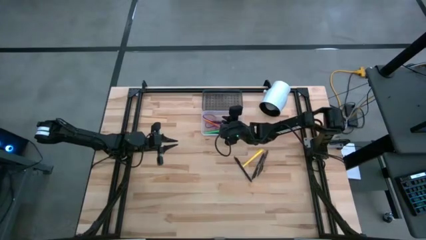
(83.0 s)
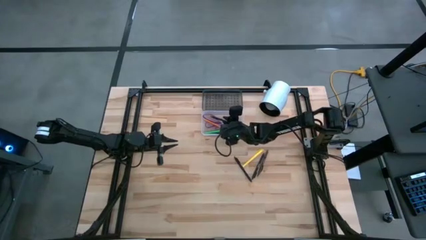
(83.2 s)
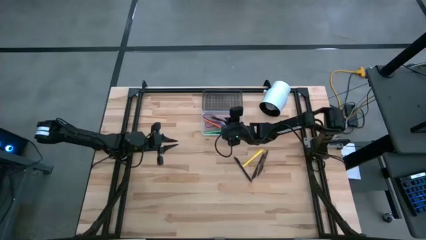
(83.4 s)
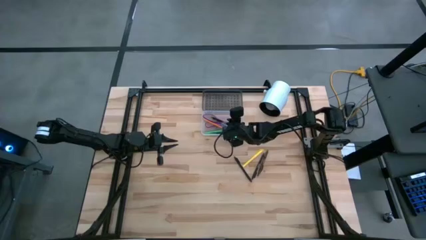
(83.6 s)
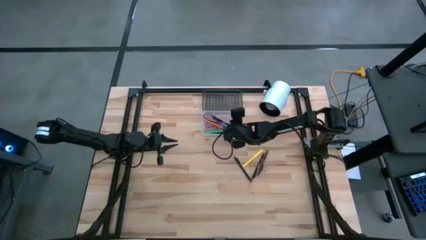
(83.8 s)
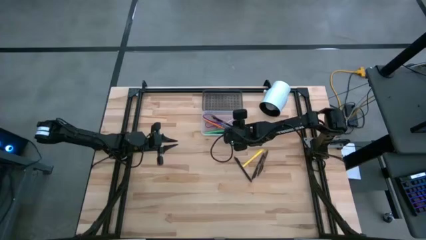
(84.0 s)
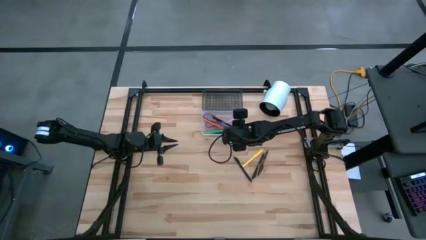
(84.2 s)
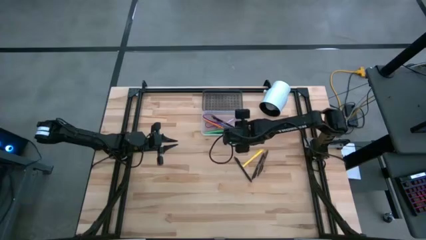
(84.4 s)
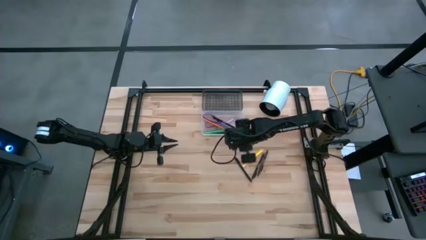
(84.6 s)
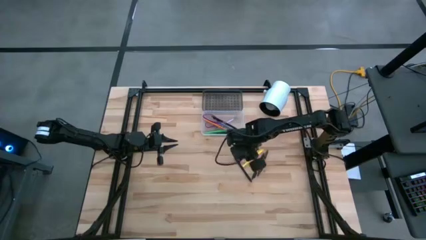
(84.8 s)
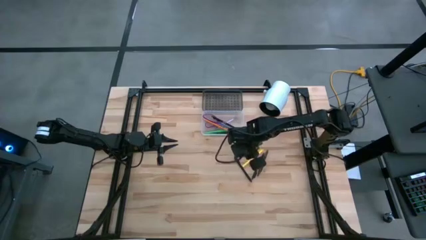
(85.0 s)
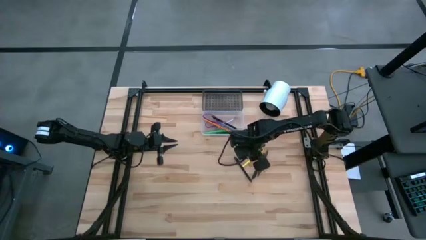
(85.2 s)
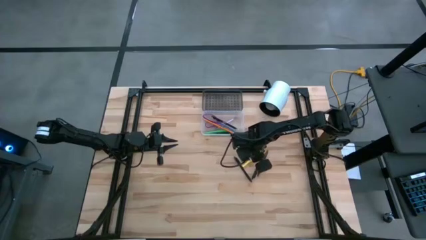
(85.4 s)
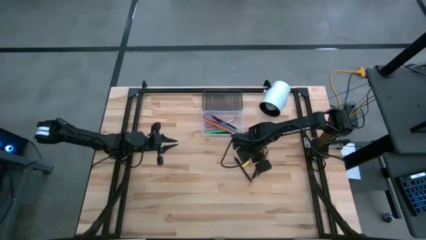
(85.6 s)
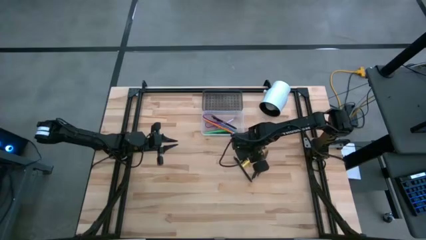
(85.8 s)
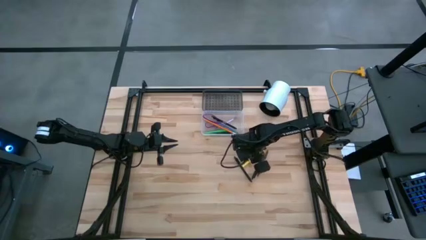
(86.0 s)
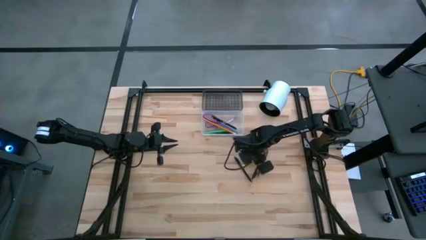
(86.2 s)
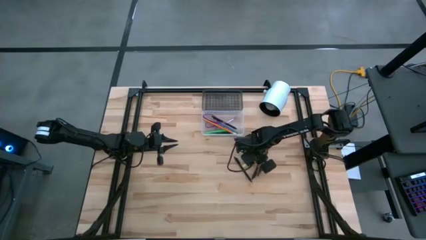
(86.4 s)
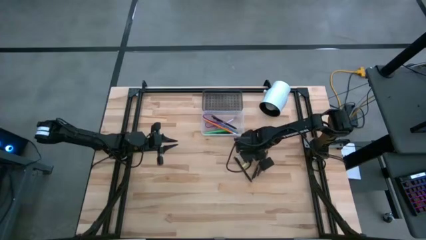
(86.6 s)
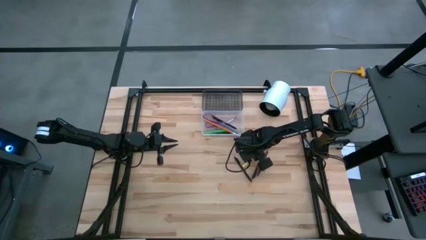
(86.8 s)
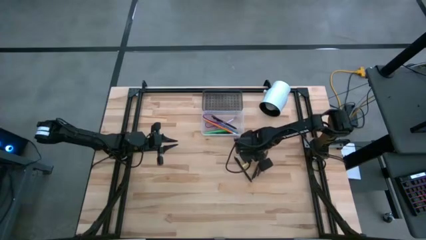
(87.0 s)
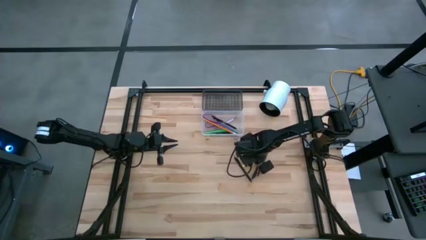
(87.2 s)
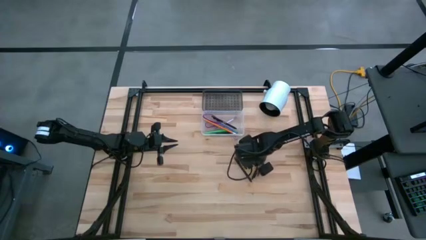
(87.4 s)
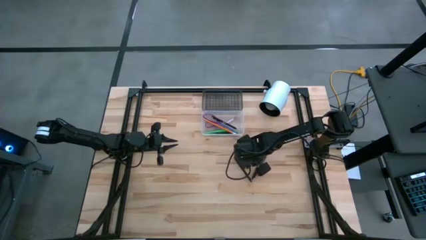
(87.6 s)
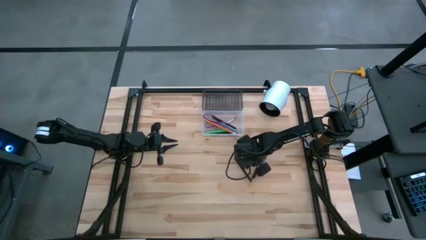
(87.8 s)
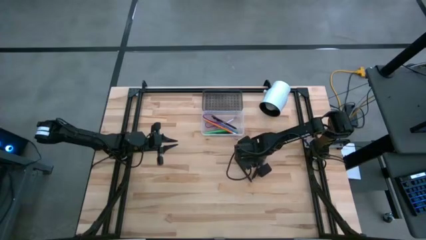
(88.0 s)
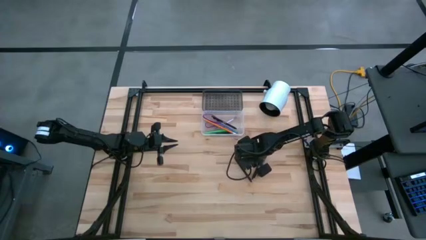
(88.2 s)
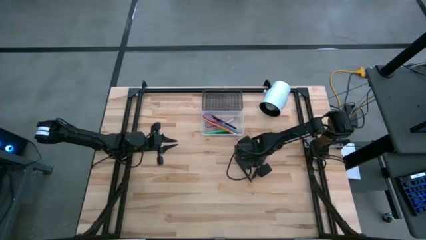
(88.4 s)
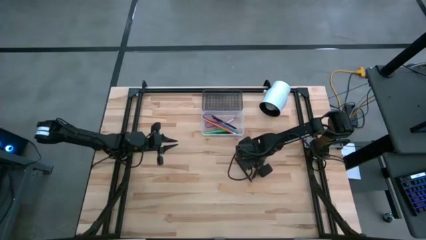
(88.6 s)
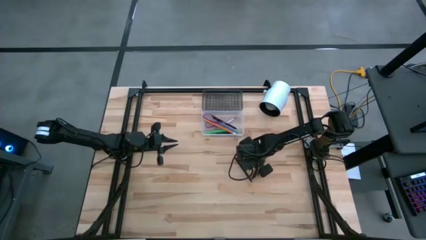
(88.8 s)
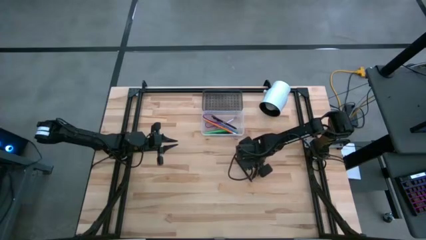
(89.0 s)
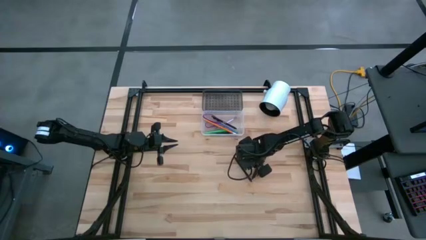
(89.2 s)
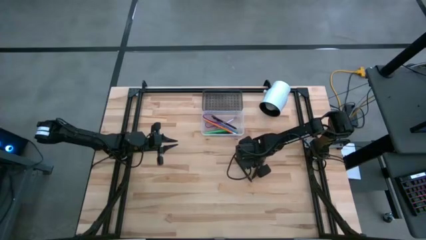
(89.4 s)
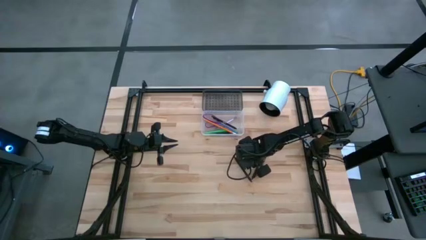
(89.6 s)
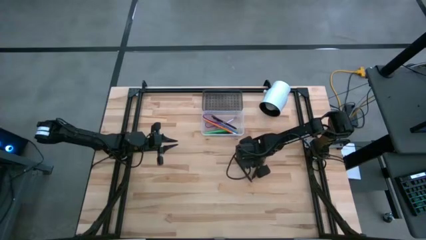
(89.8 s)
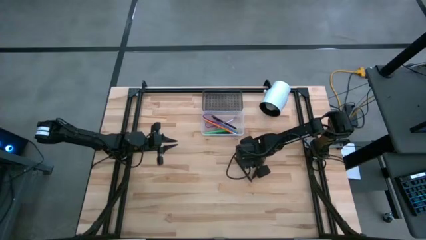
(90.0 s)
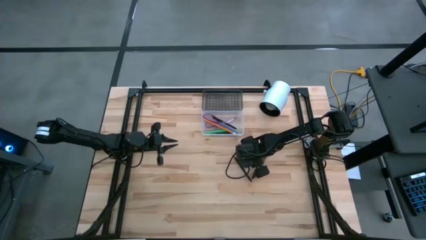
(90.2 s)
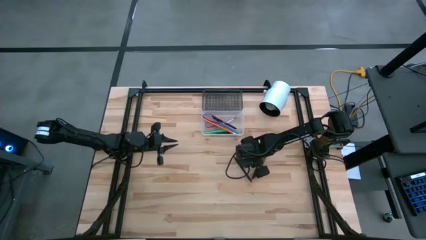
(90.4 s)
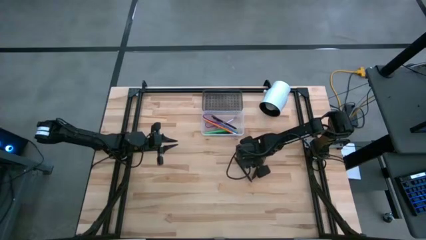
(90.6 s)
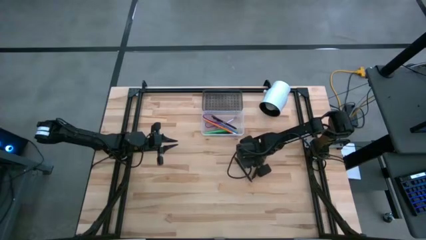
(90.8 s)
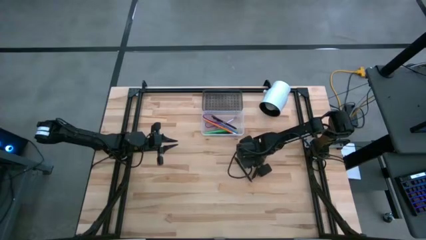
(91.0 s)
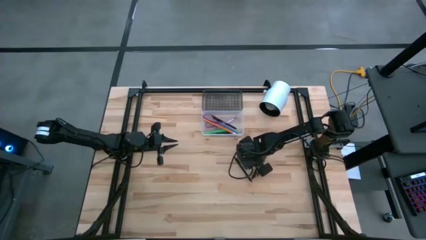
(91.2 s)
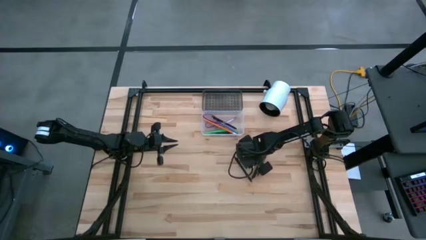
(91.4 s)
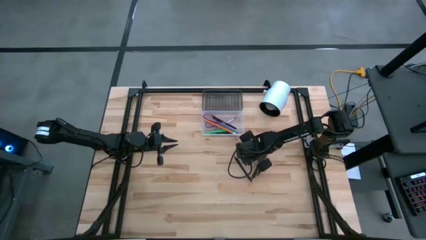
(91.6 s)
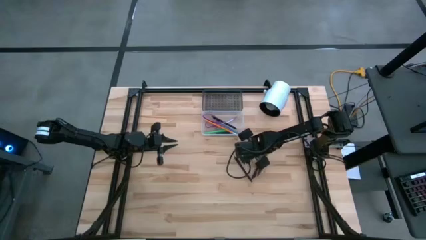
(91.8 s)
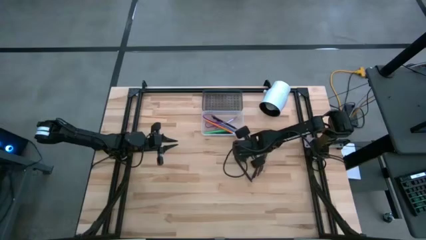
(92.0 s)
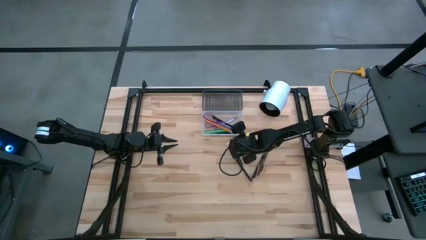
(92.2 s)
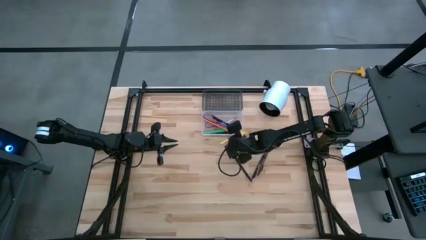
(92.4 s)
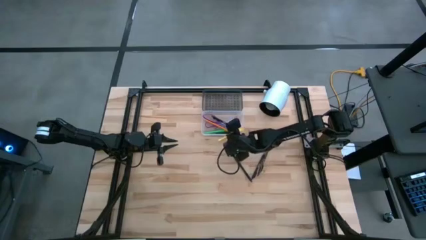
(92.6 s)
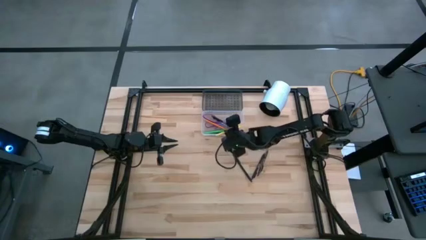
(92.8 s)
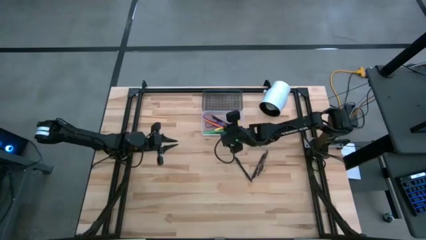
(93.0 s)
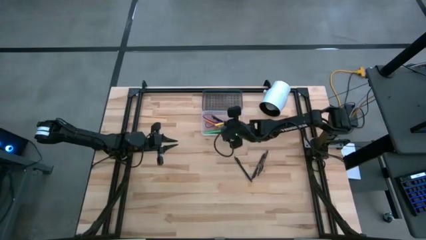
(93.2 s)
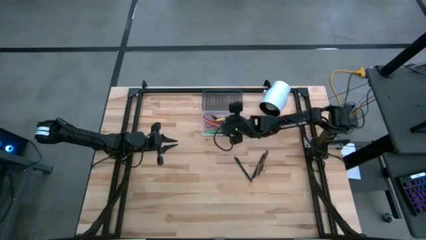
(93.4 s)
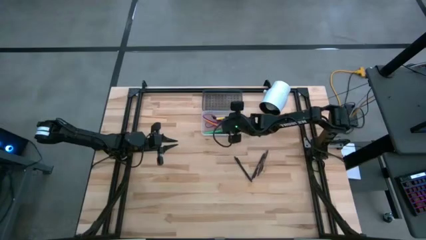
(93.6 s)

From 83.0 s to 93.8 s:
Task: Pick & place school supplies into a supply box
Put the yellow pen into the black box

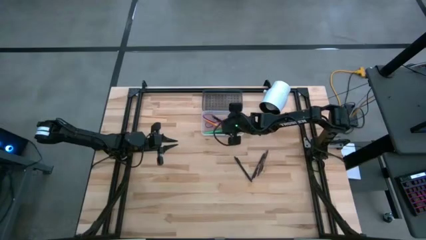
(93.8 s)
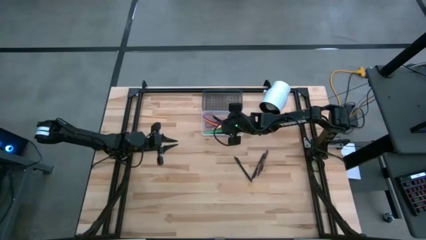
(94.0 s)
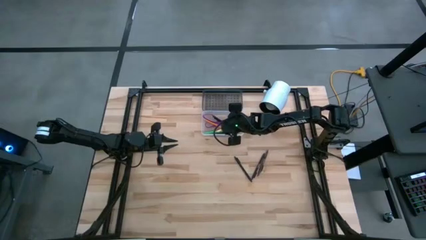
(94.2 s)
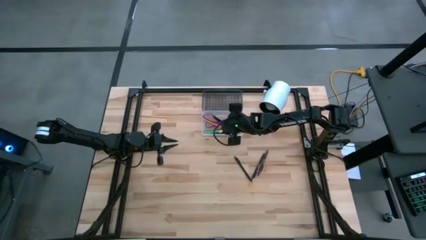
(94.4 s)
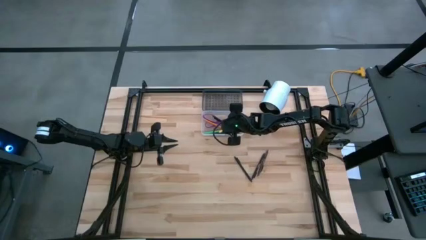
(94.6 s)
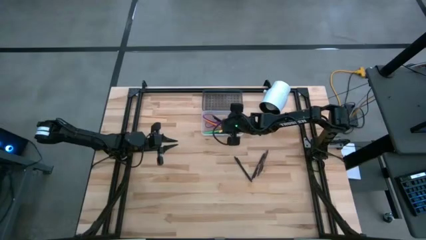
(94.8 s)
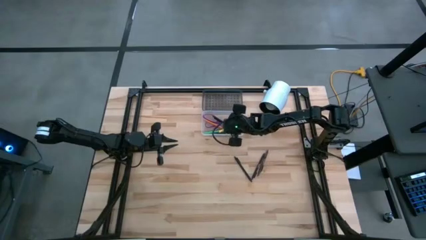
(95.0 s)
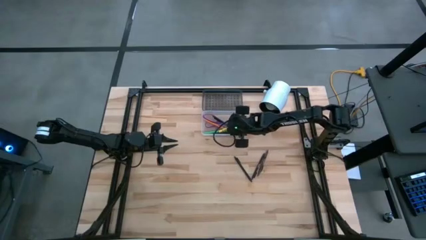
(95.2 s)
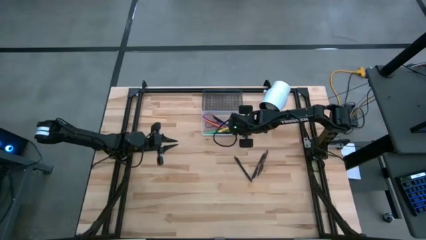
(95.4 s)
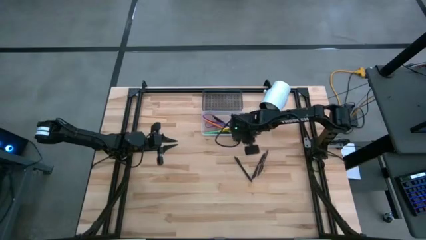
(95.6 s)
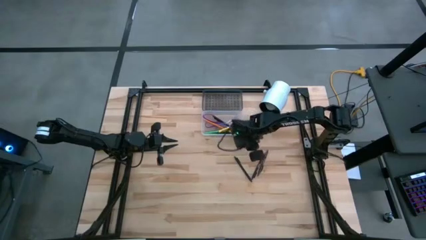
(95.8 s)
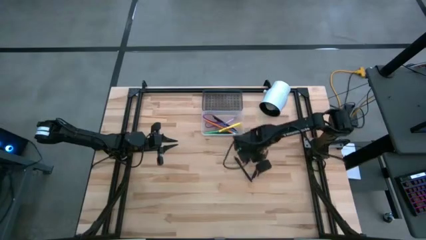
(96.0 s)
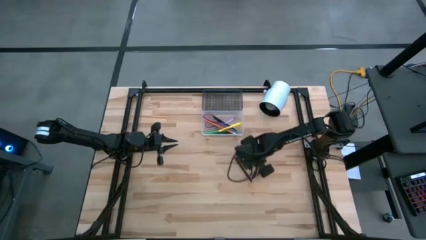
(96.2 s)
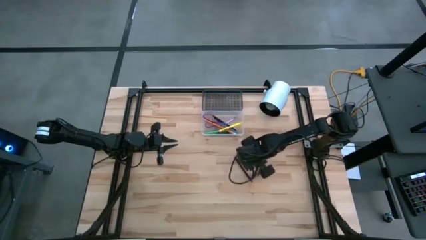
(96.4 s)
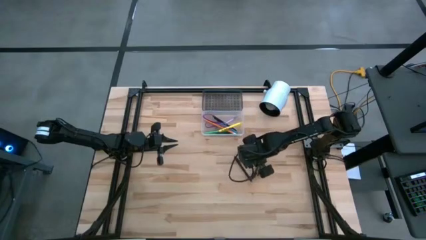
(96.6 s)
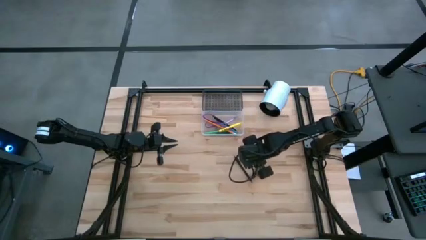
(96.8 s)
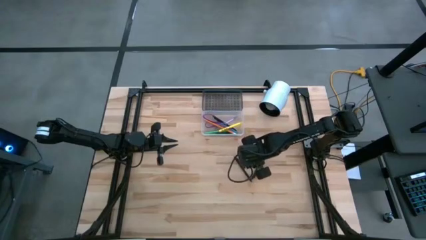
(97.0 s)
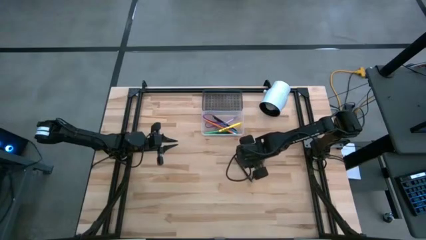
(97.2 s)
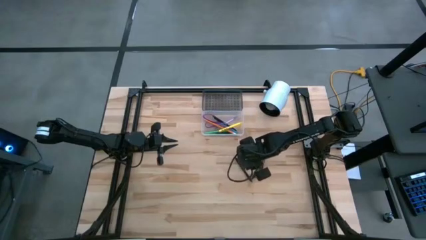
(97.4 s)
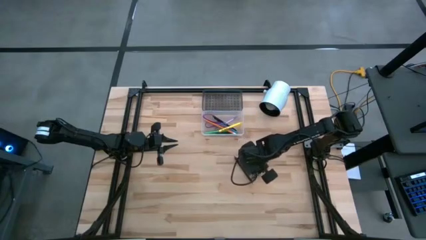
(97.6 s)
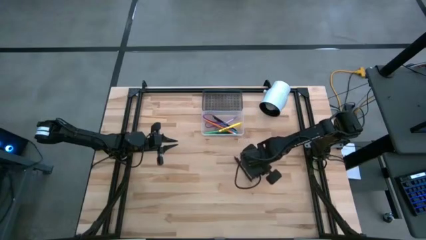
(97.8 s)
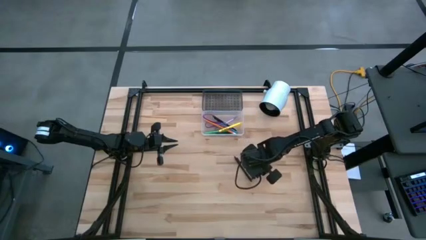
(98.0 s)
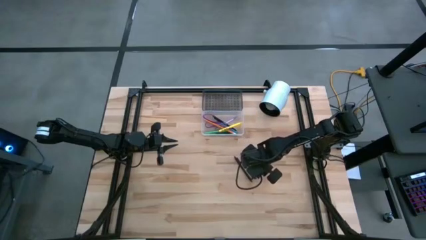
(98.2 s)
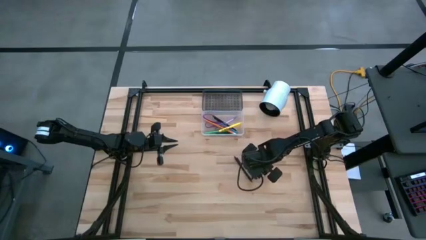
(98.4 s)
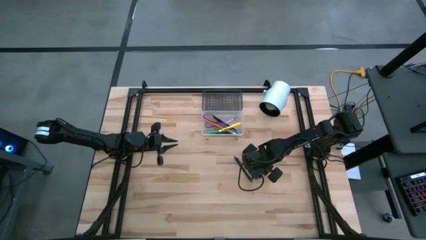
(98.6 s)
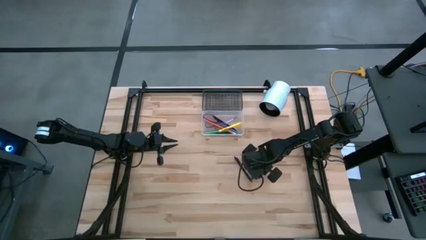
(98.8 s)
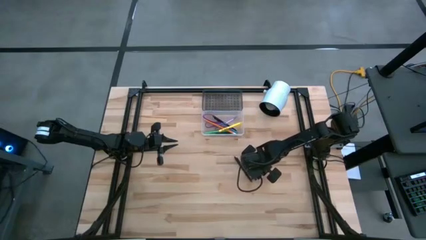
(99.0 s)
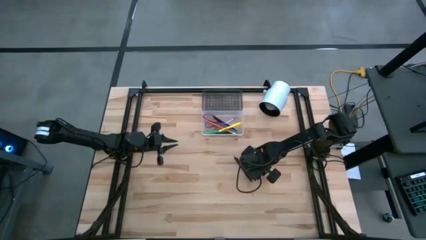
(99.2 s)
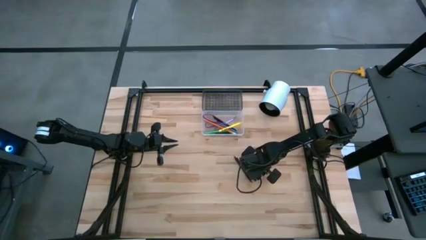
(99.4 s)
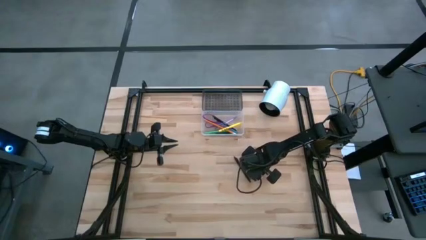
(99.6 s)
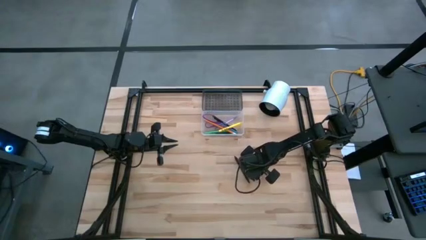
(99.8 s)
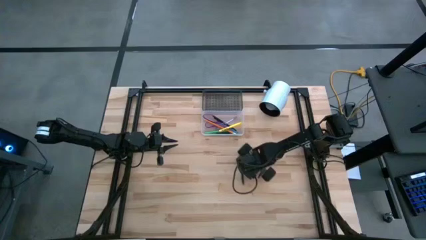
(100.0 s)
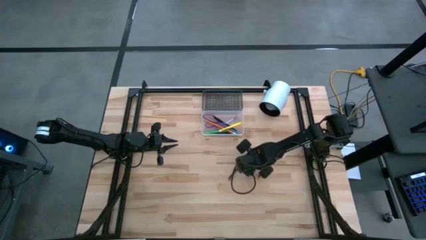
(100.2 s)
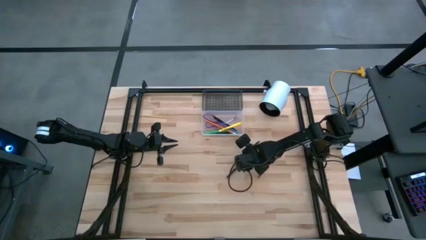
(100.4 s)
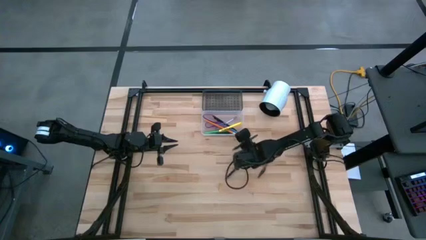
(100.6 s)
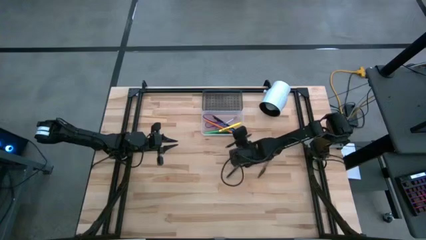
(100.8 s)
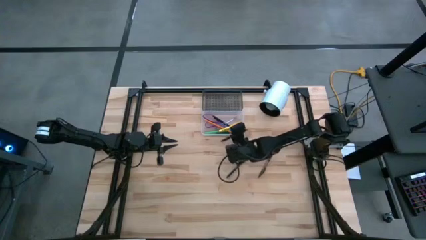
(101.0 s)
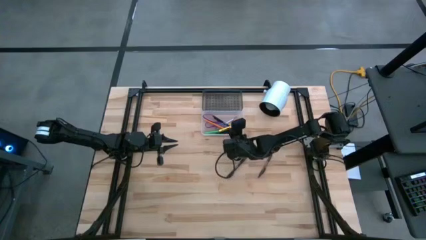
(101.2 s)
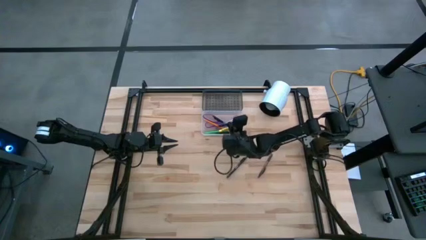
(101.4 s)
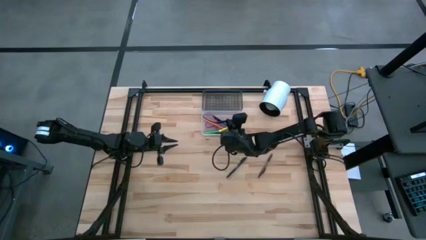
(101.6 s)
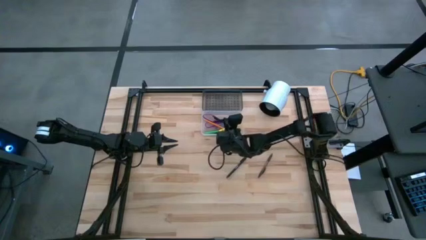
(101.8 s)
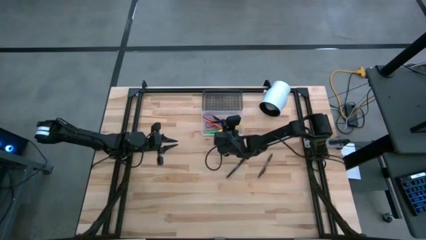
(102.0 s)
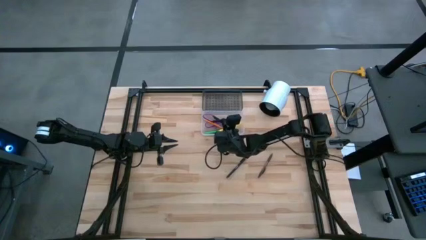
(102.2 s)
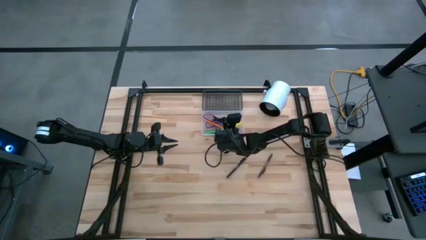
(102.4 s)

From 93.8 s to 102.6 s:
Put the black pen into the black box
